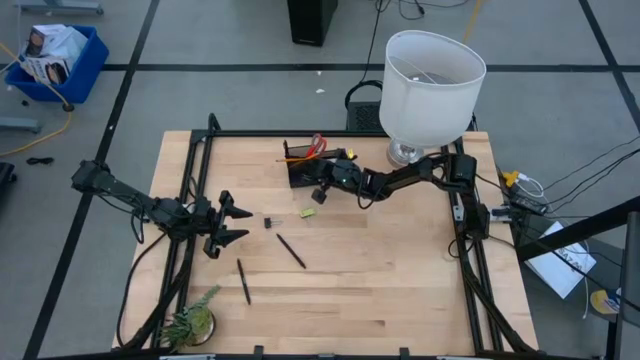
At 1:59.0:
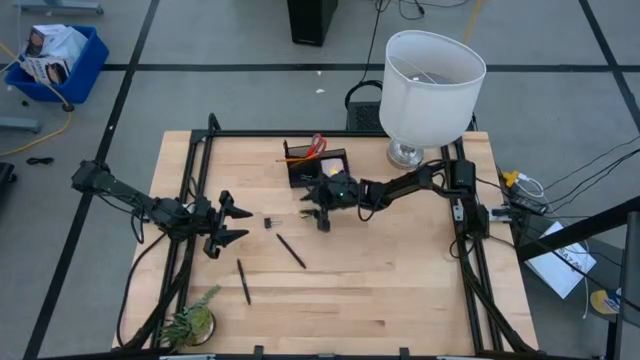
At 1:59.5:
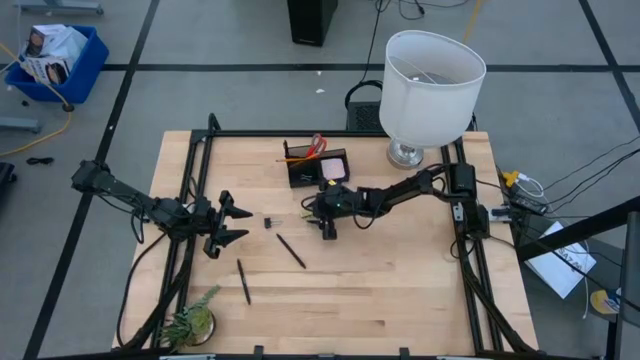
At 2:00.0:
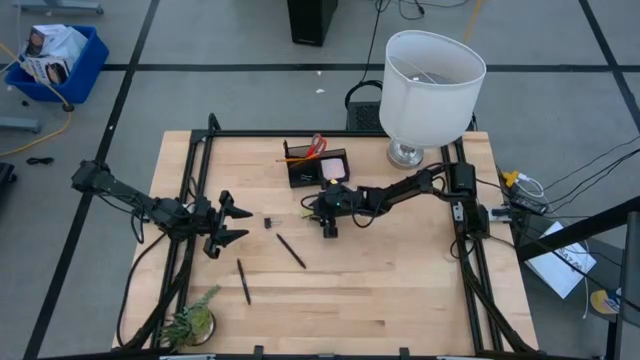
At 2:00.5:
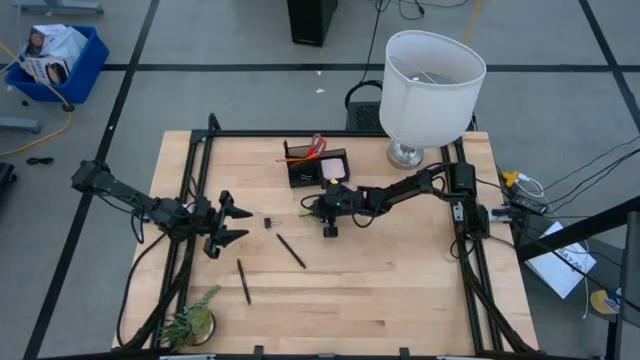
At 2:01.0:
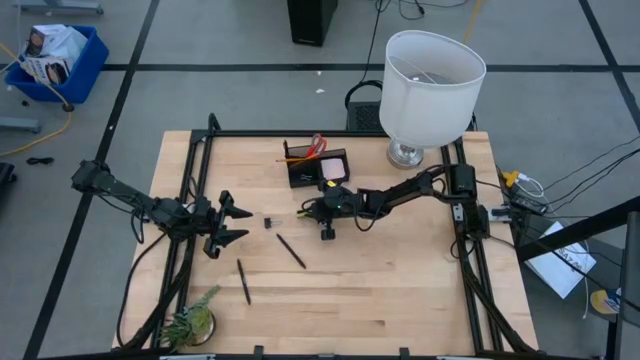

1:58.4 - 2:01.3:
Task: Pick and place office supplies into organizer
Put the green eraser into the black desk organizer

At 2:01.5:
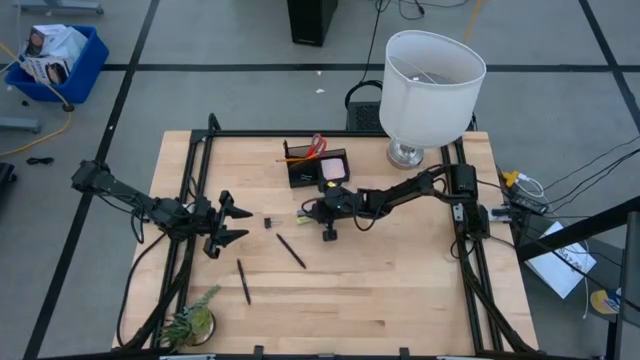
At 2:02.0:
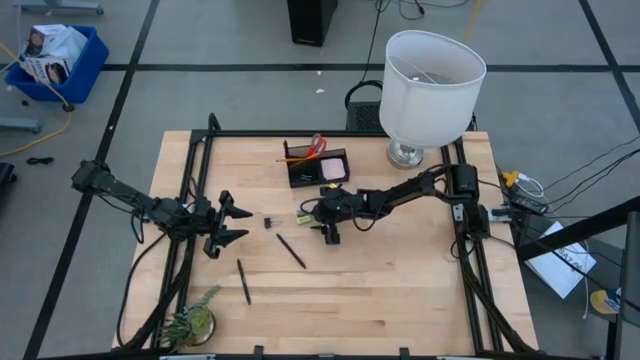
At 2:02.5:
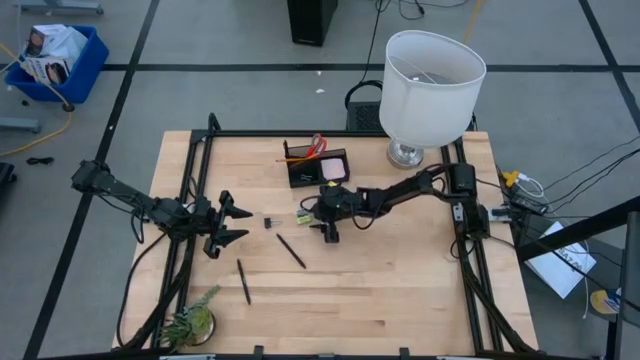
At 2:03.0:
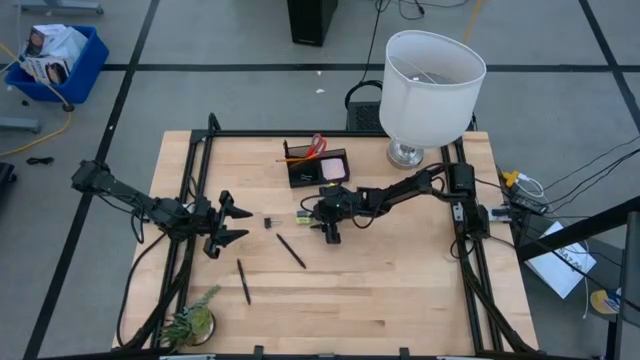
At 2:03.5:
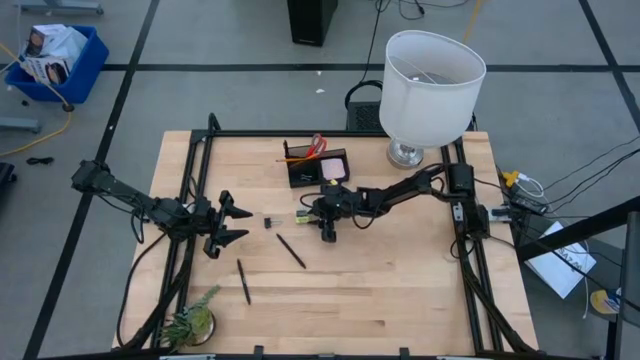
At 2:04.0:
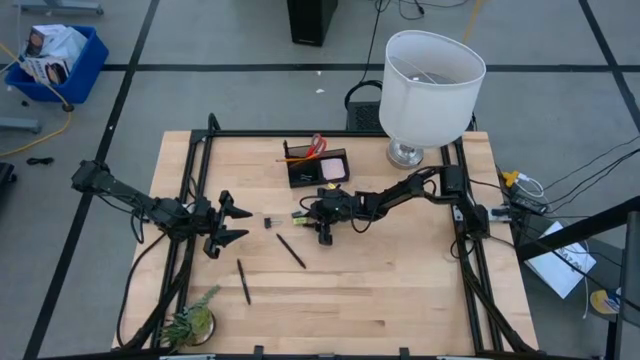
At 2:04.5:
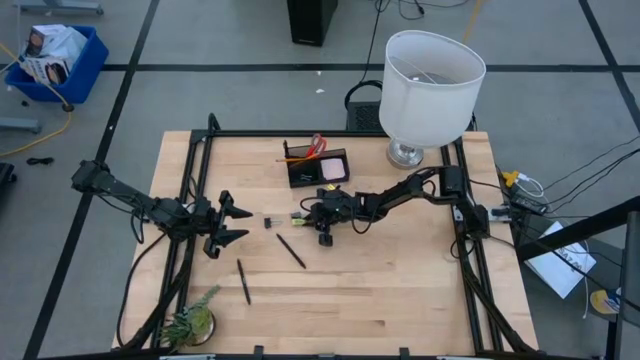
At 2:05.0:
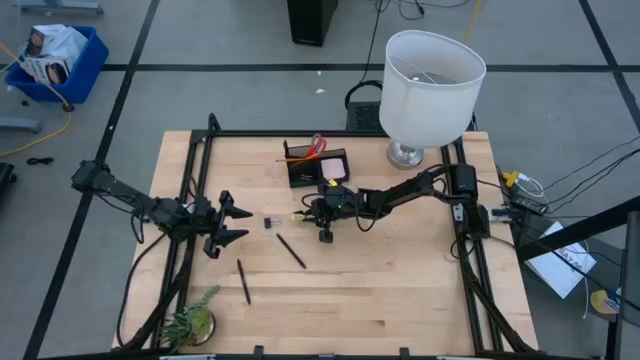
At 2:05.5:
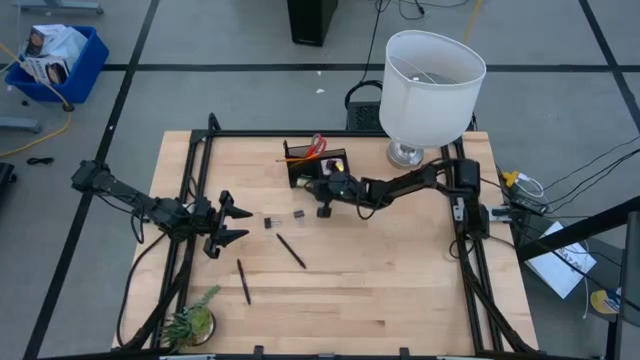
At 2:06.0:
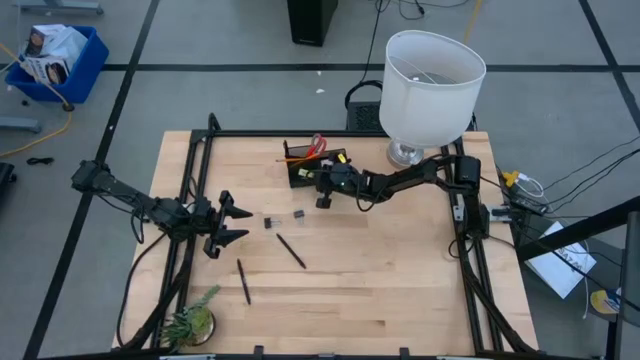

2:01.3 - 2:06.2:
Put the green eraser into the black desk organizer

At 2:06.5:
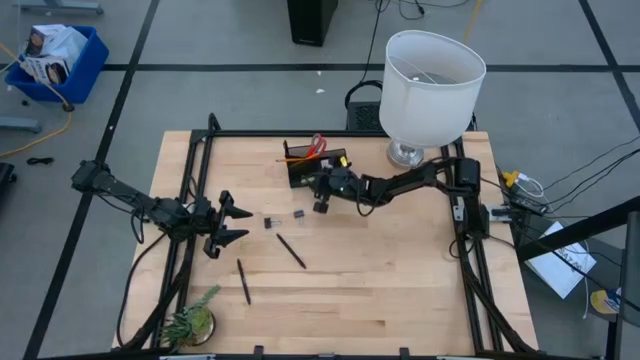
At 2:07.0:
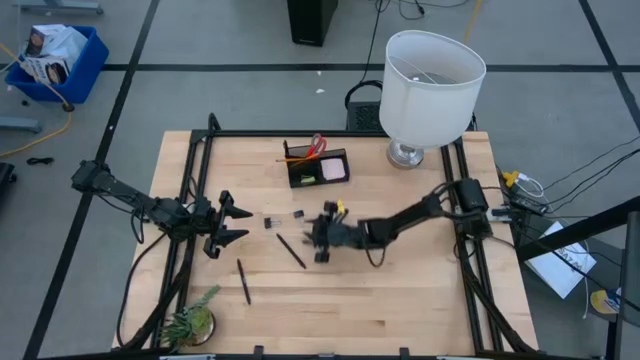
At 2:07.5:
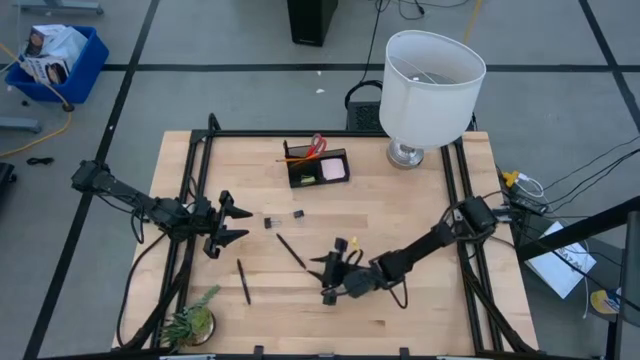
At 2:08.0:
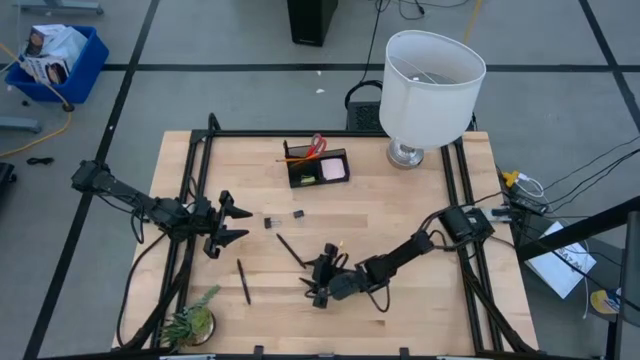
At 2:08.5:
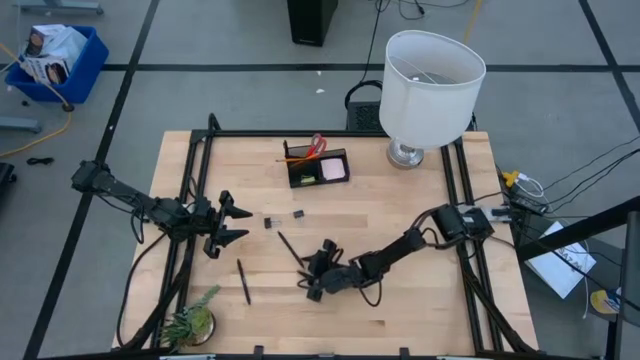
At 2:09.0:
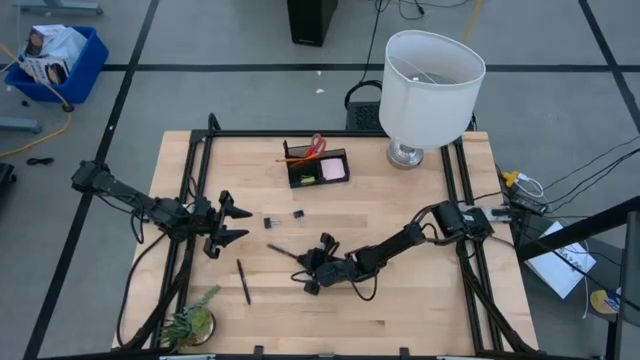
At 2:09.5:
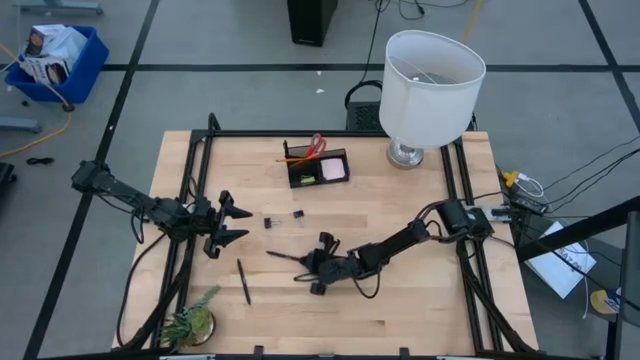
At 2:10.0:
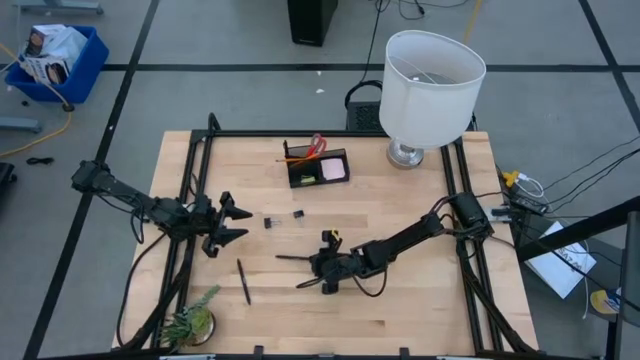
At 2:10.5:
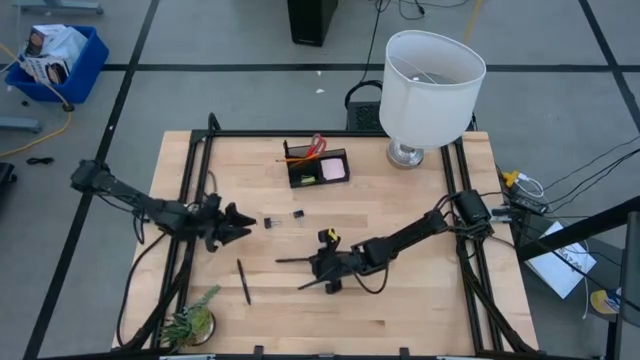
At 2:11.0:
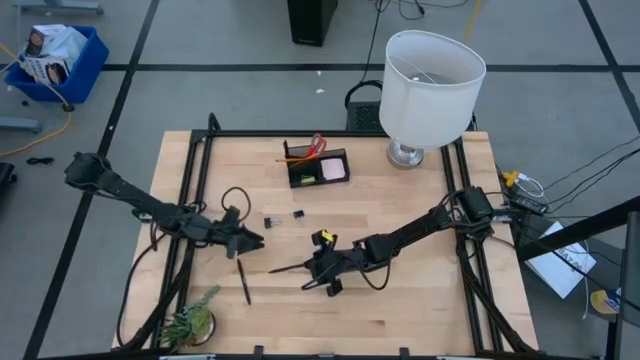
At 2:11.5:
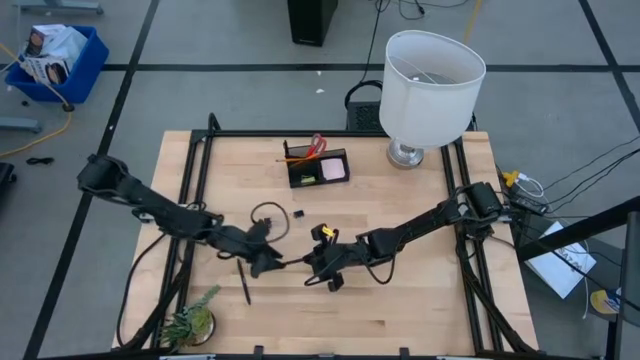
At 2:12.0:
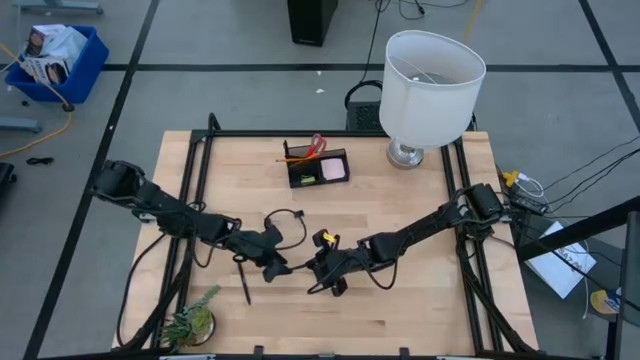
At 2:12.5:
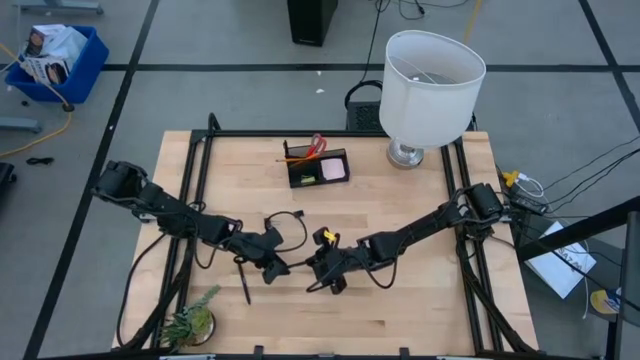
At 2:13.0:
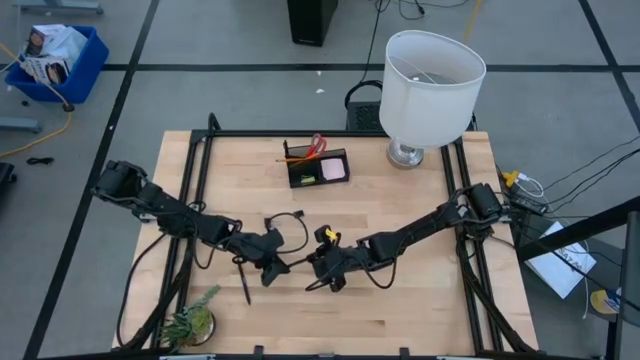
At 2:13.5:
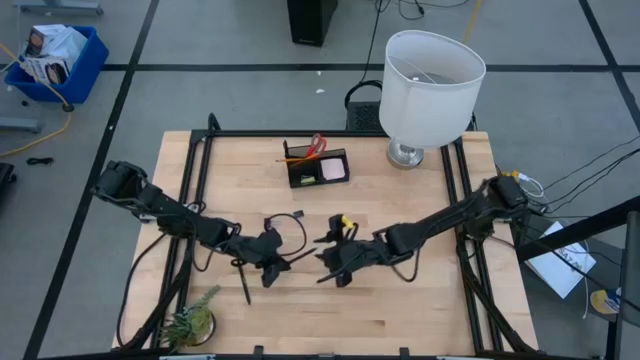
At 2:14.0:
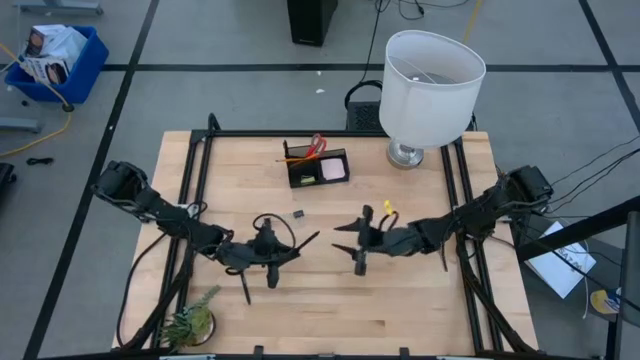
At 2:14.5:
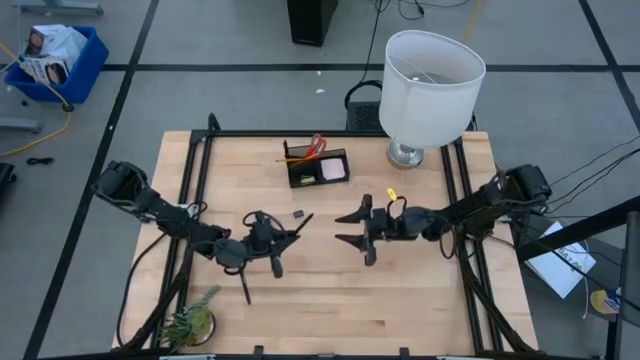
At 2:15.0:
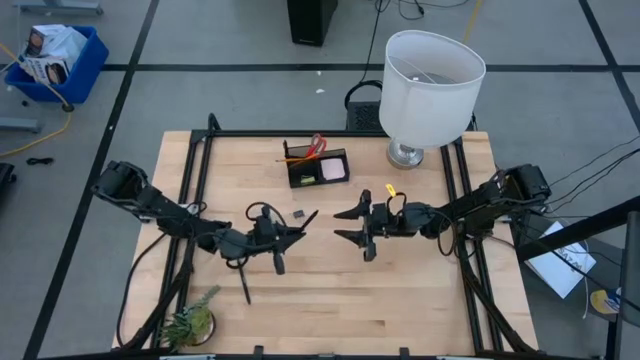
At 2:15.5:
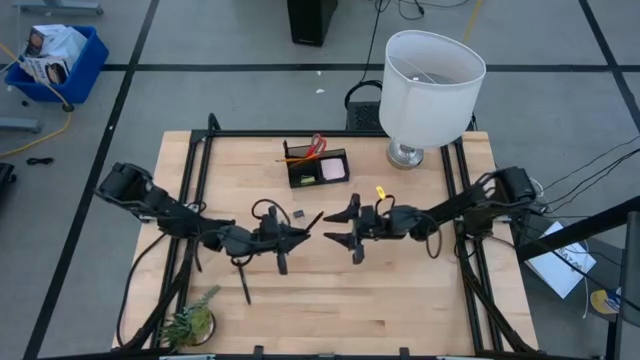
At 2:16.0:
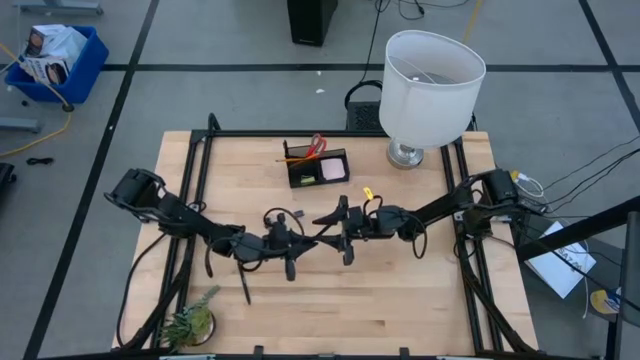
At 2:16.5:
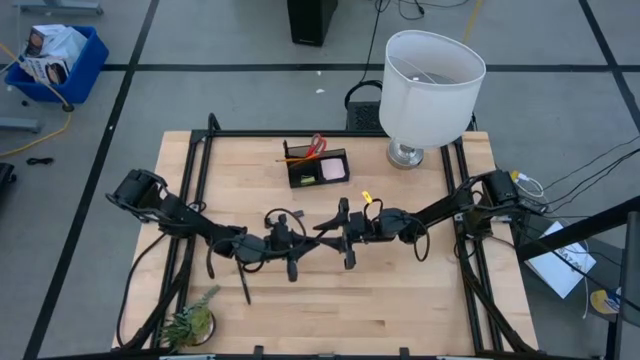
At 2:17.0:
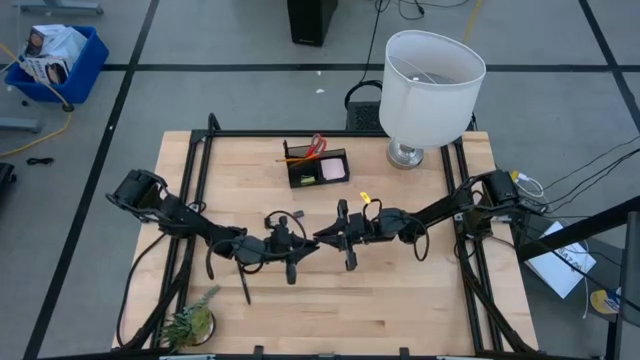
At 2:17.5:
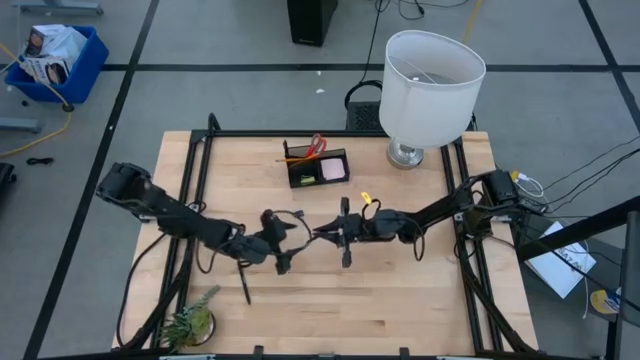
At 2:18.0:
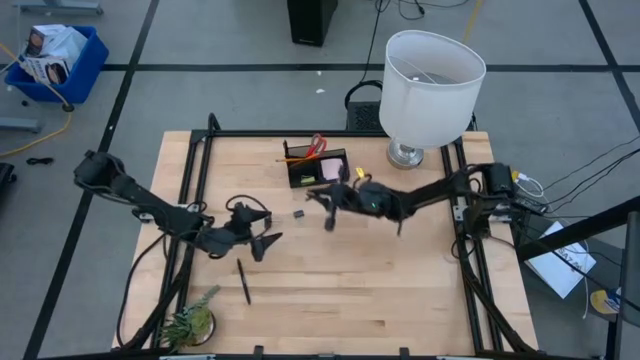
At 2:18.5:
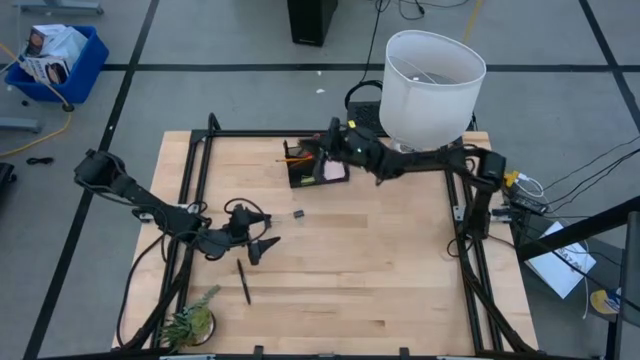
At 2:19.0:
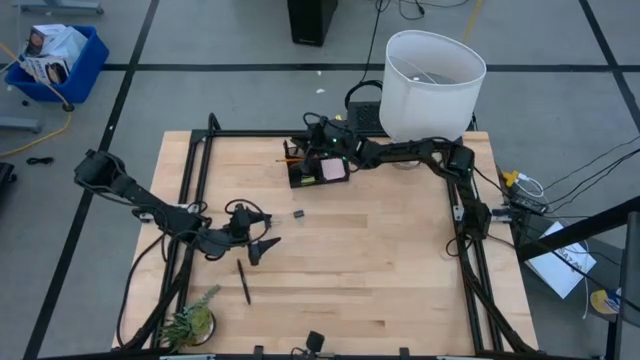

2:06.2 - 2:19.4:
Put the black pen into the black desk organizer
